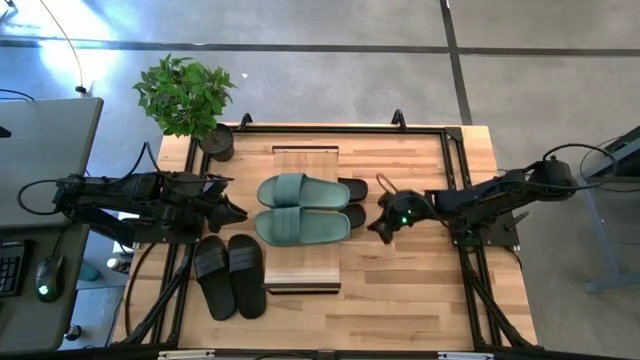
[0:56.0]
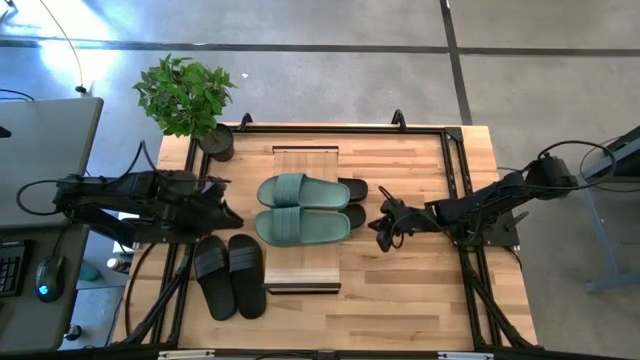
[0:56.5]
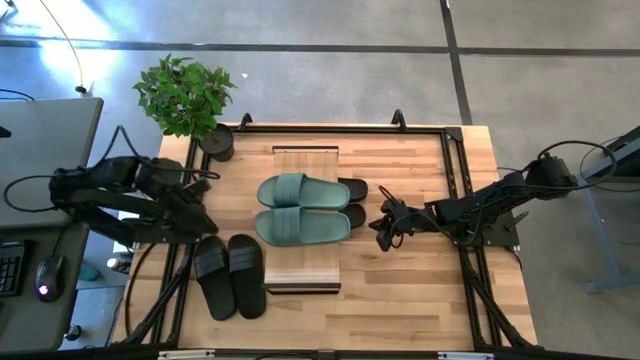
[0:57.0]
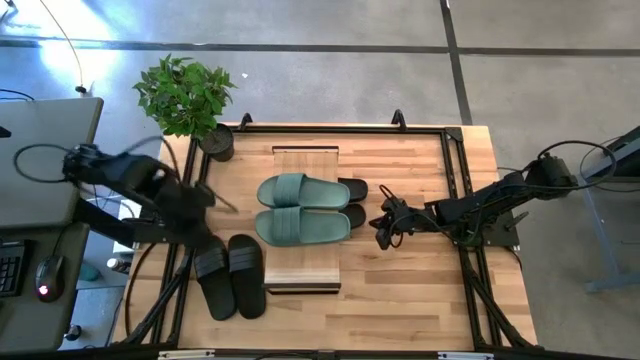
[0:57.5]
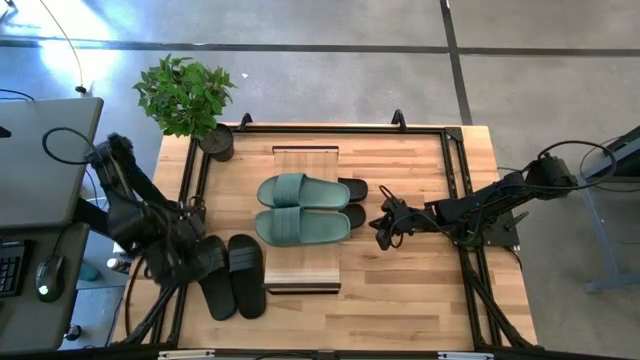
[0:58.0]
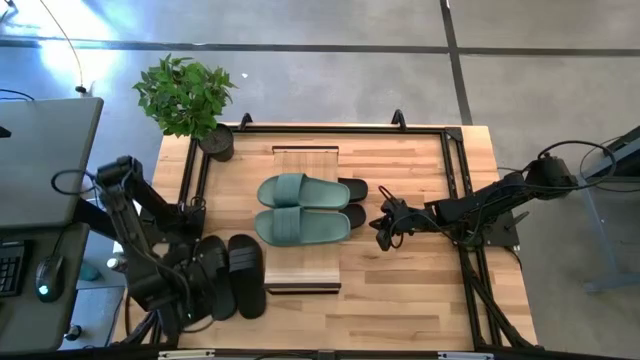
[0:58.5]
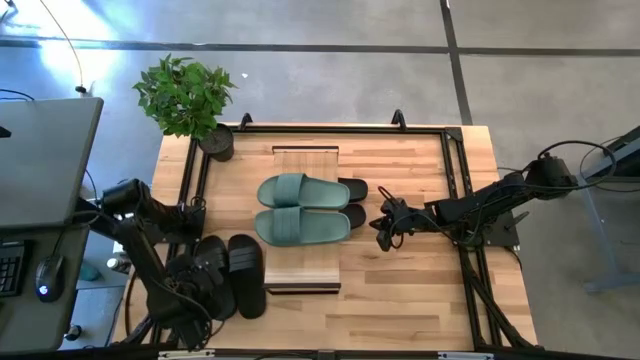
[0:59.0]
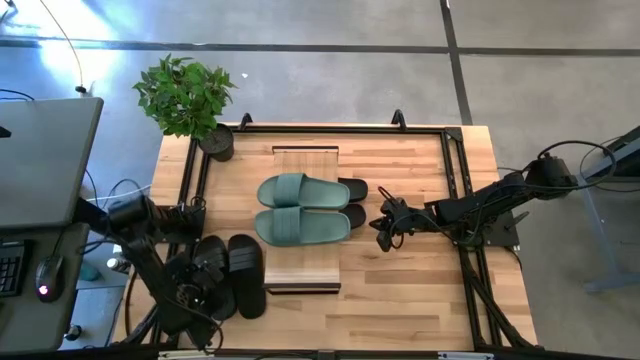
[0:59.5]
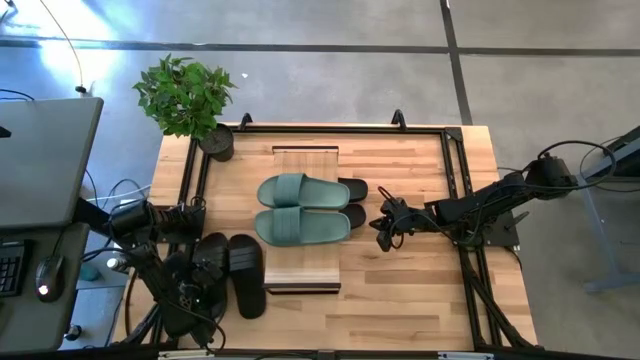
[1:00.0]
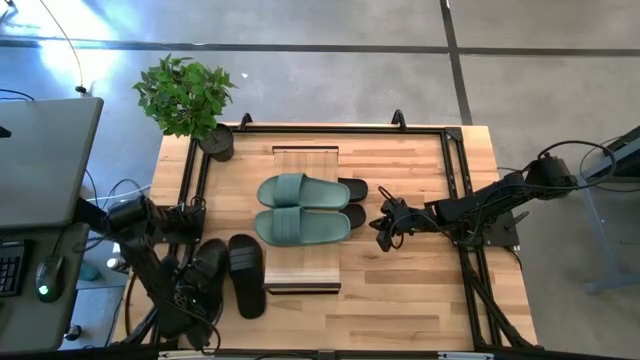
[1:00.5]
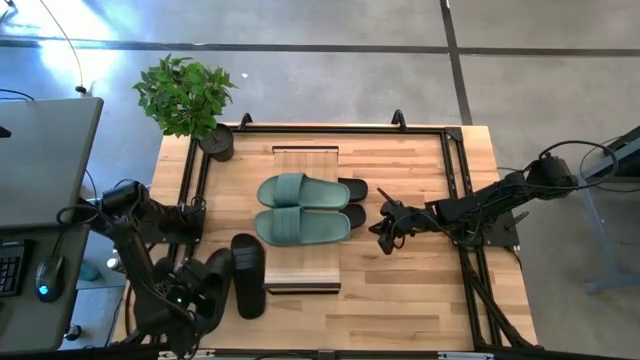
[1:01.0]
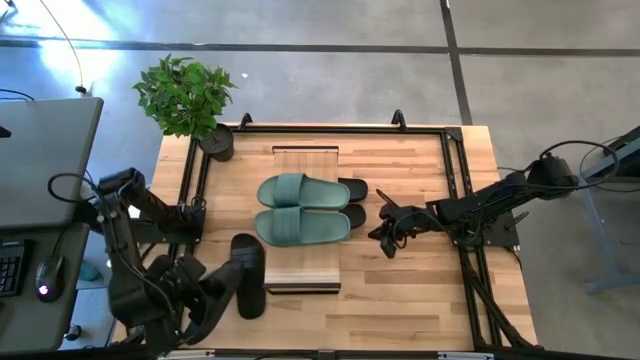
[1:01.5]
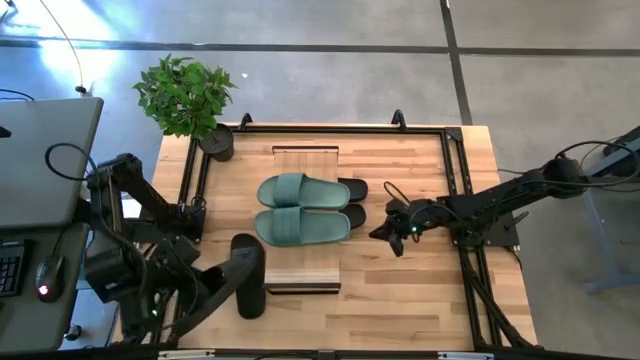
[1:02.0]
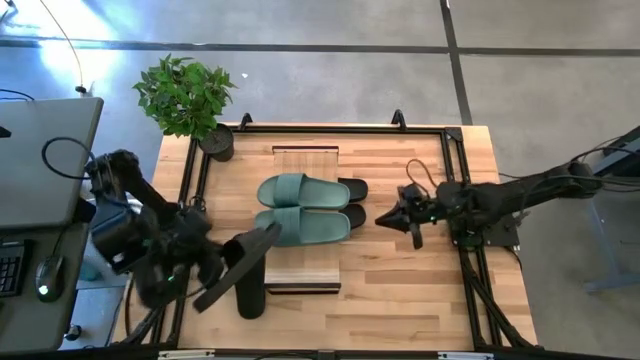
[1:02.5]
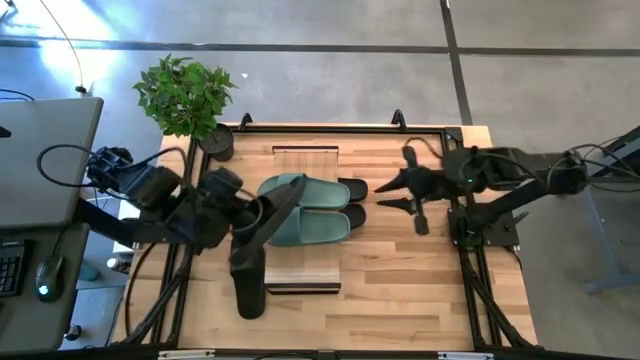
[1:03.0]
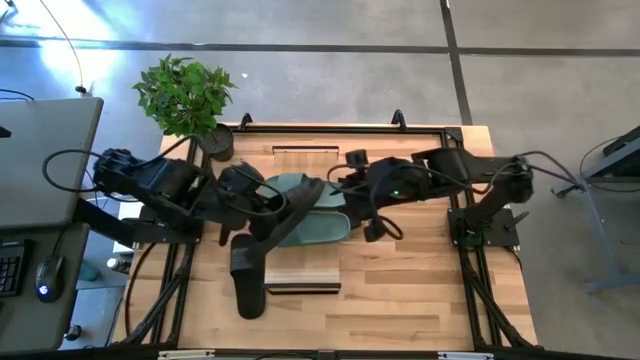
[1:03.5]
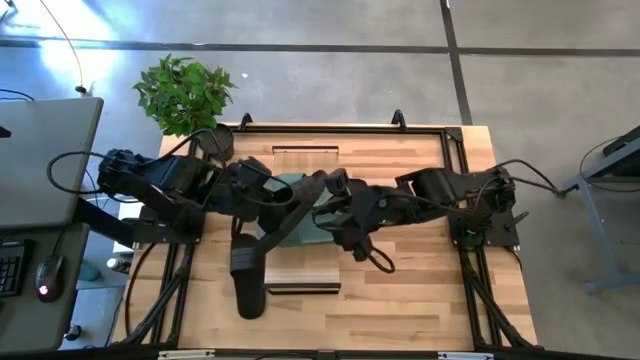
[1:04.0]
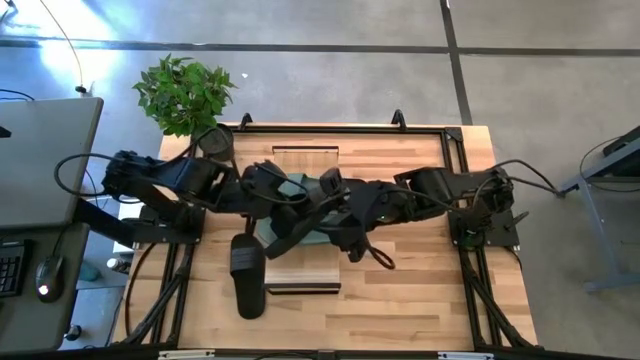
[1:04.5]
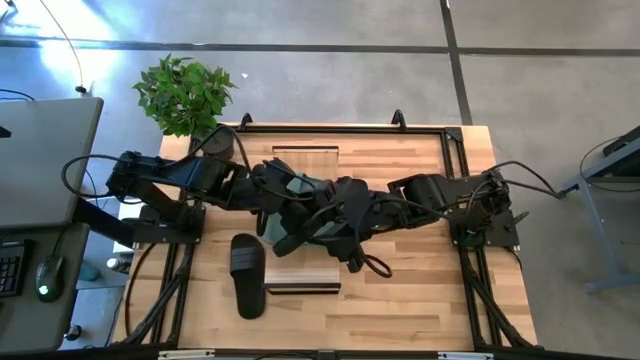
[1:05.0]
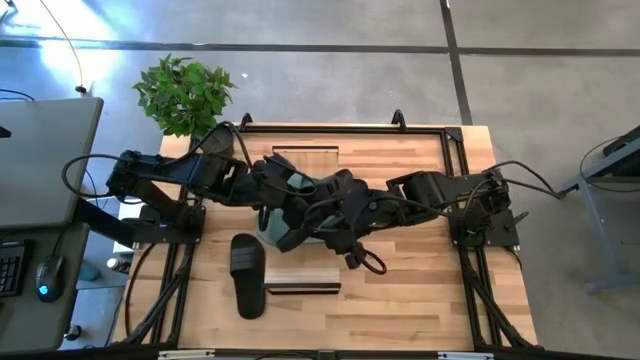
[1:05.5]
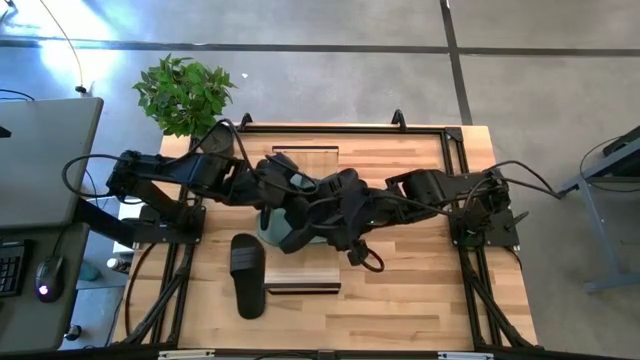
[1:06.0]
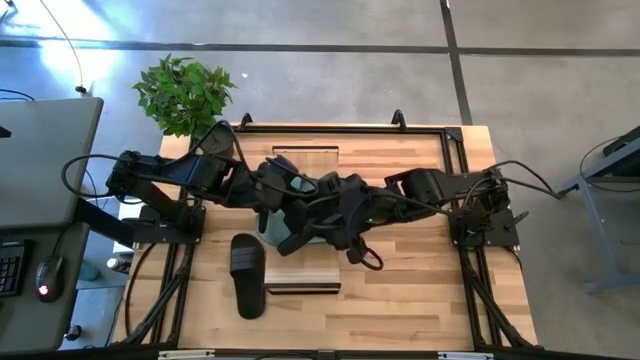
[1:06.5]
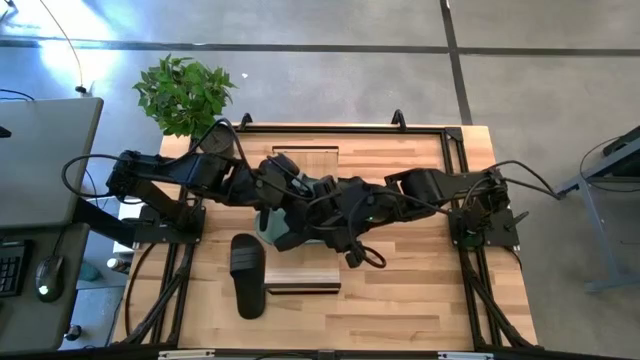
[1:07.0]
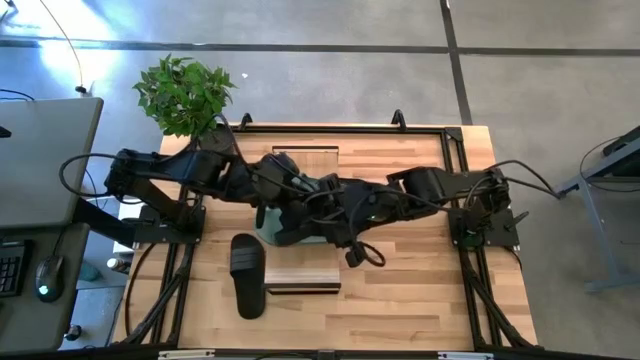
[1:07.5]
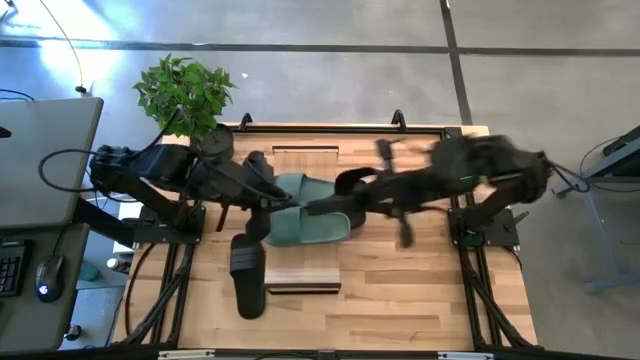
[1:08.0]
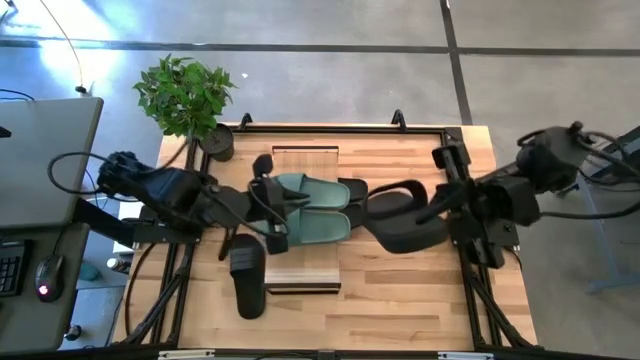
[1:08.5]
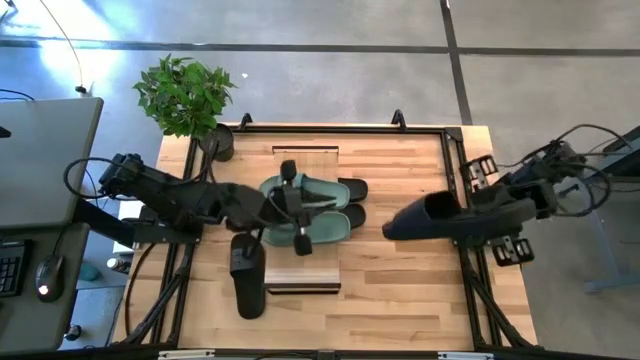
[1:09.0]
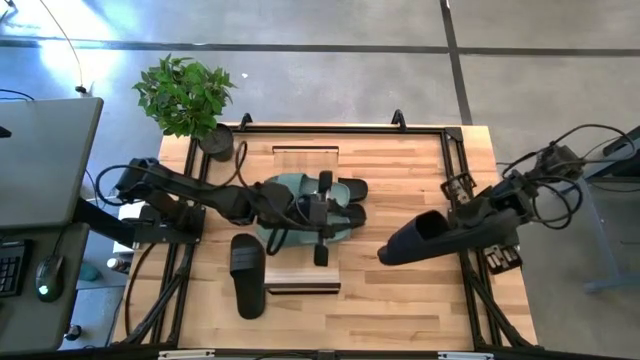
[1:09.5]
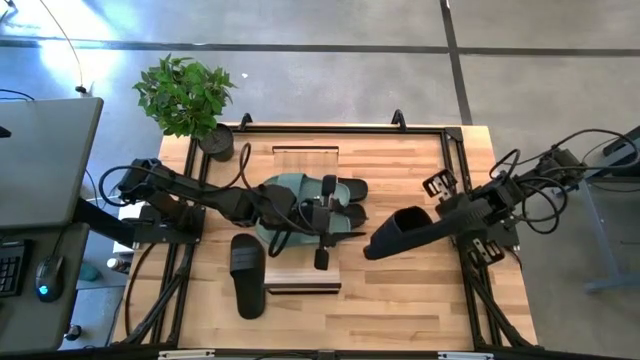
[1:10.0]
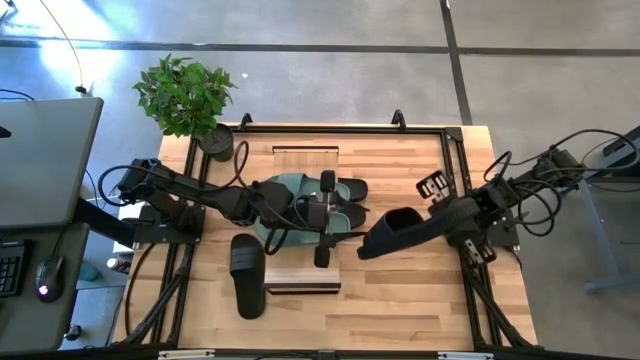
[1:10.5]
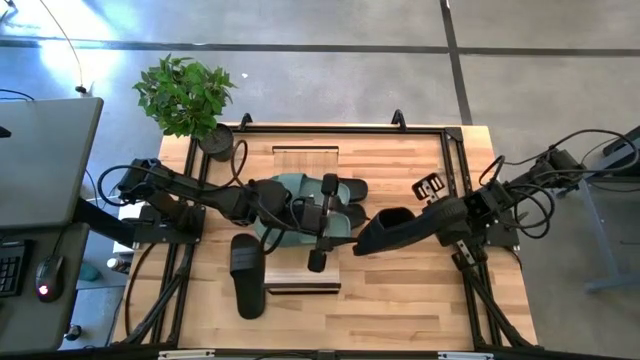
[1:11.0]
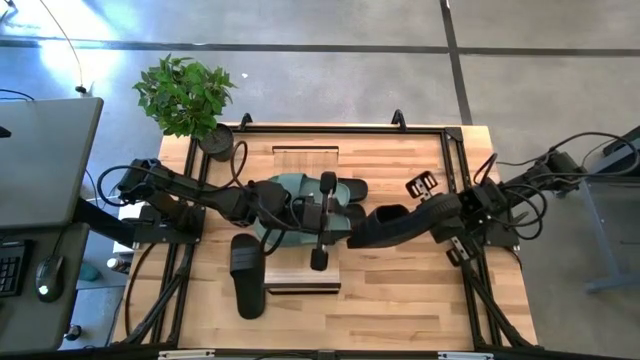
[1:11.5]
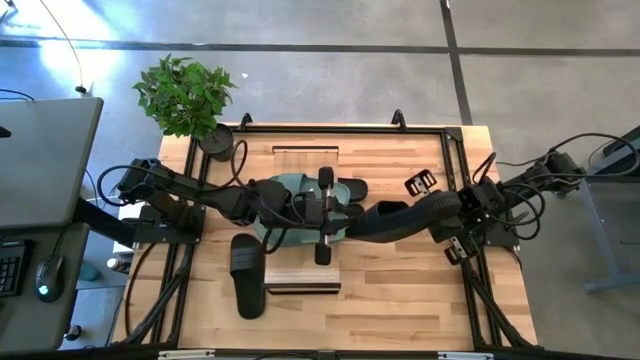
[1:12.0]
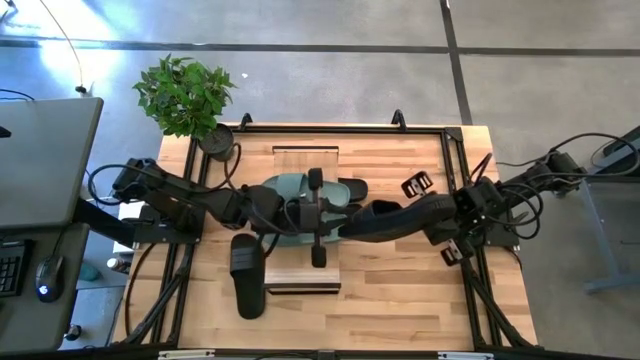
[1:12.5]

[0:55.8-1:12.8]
Task: Pick and place slides into the shelf
Put the black slipper under the shelf

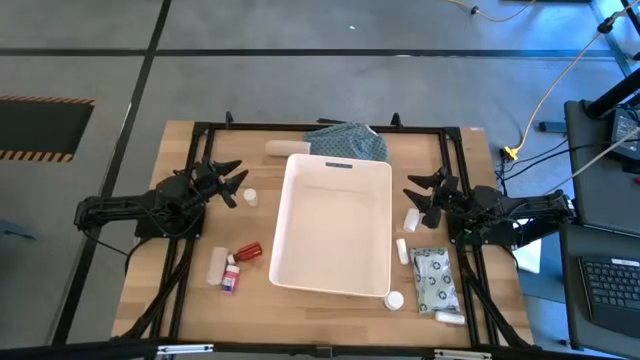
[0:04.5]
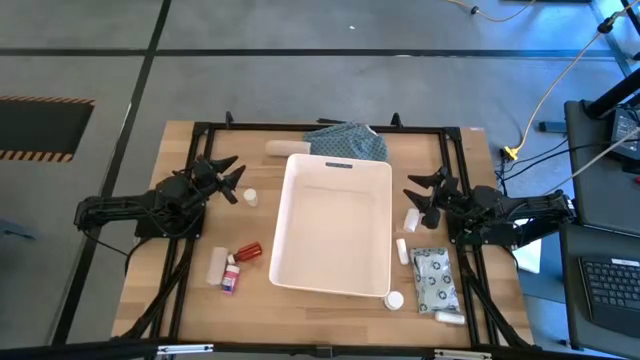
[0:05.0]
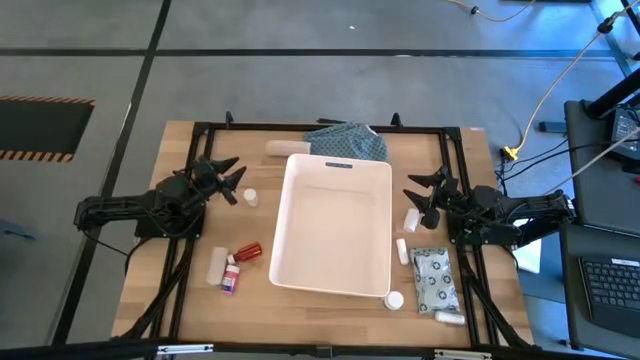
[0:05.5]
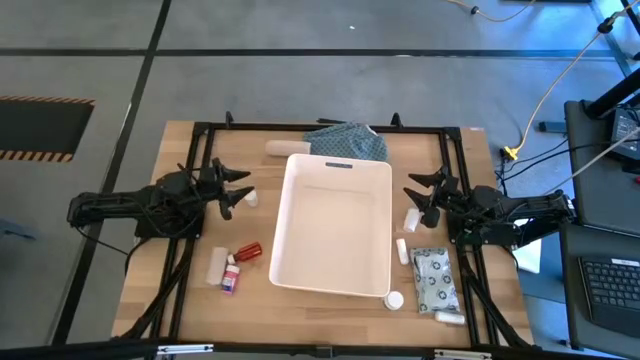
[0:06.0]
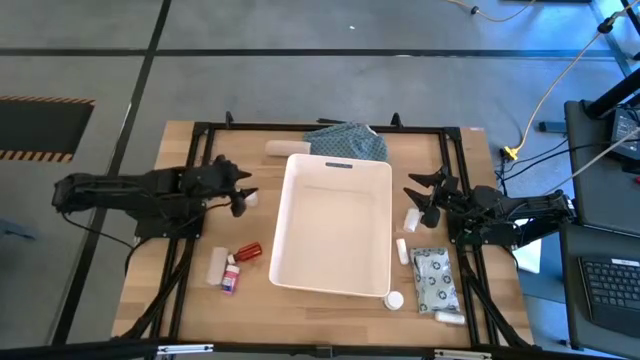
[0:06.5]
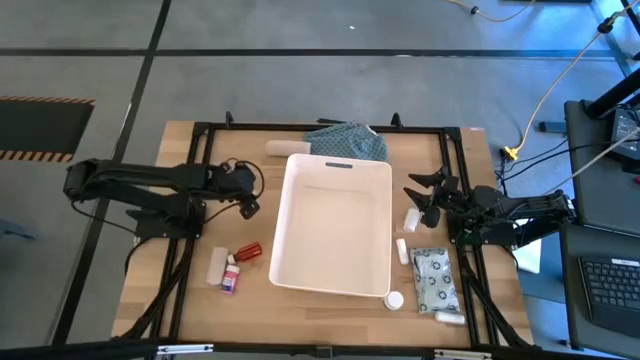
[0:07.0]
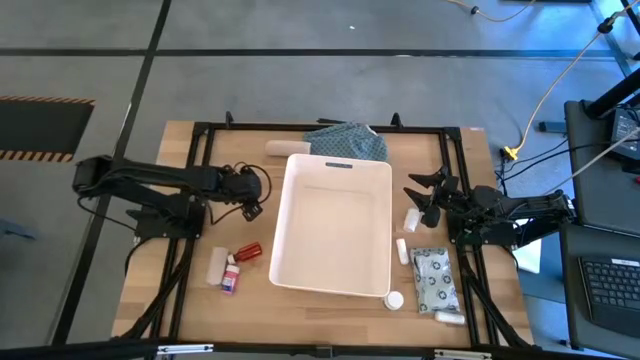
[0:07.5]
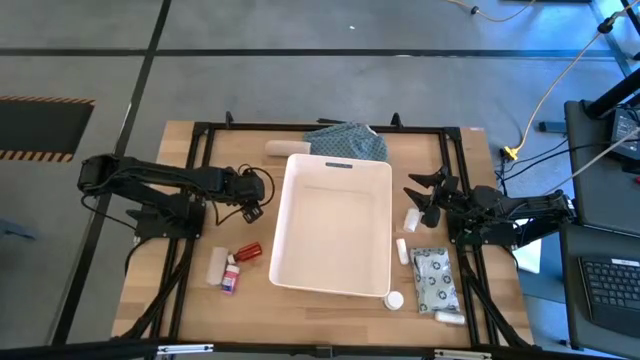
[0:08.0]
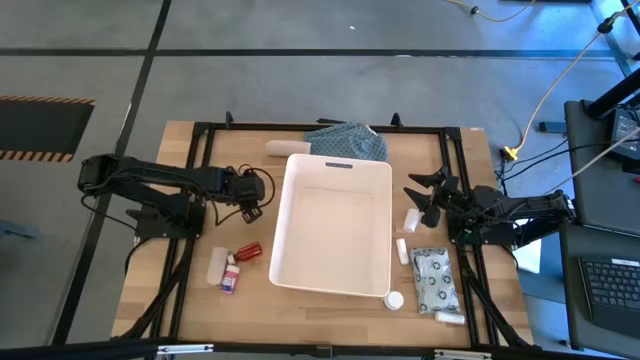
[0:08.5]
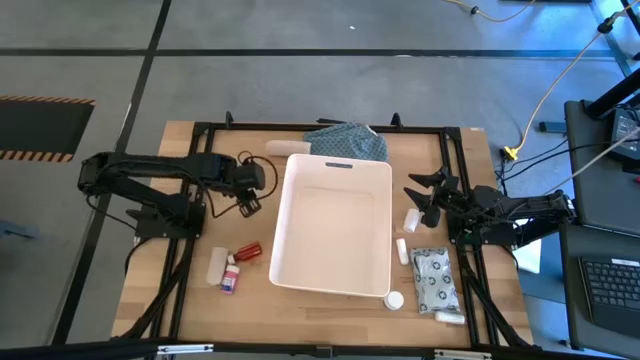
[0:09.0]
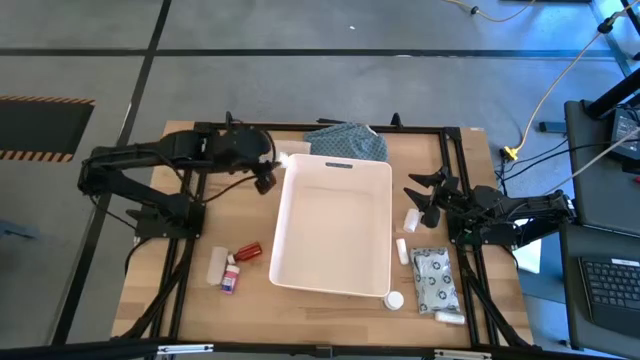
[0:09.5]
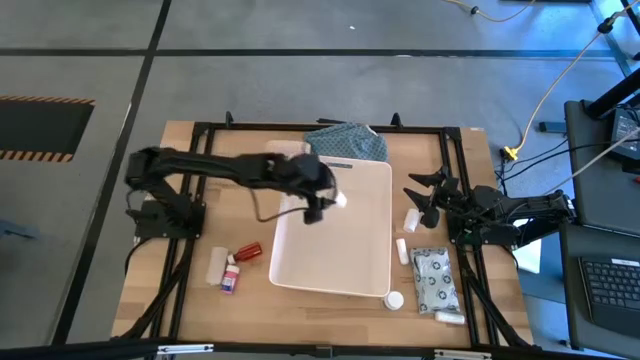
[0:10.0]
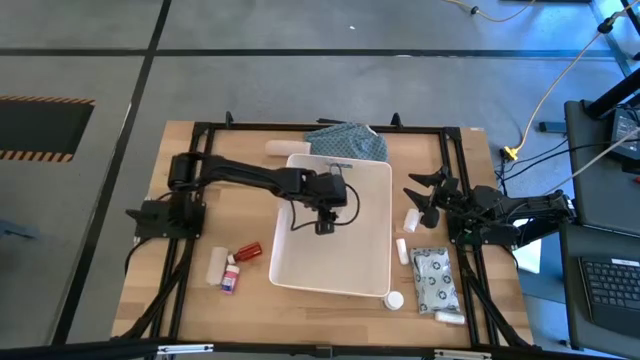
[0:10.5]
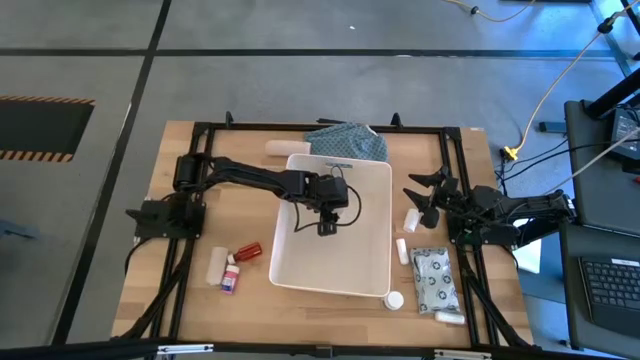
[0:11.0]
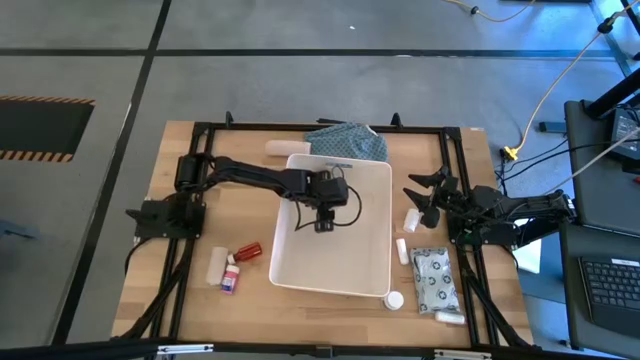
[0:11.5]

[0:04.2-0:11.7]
Task: Pick & place medical supplies in basket/bin
Put the top left white pill bottle into the white bin
